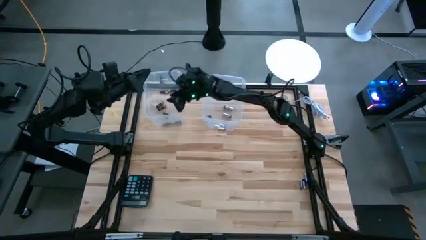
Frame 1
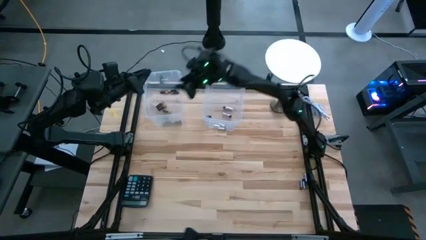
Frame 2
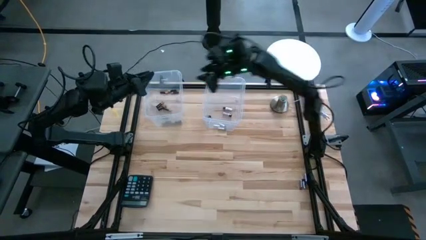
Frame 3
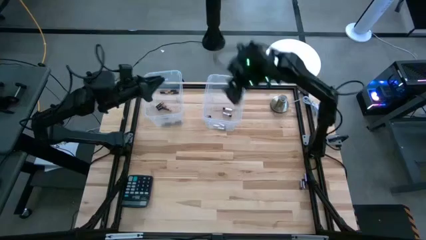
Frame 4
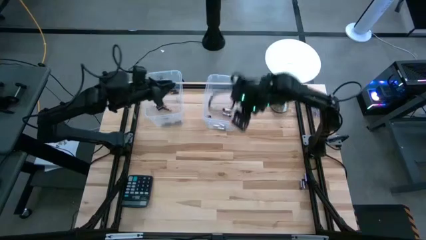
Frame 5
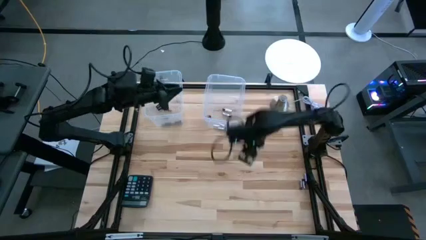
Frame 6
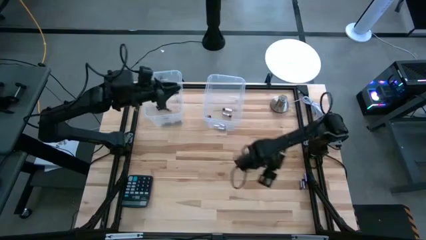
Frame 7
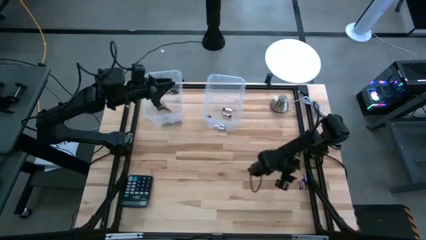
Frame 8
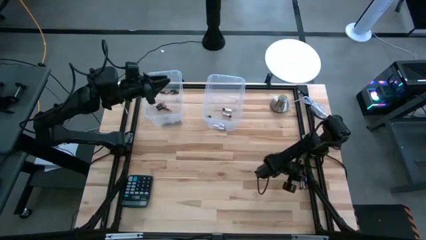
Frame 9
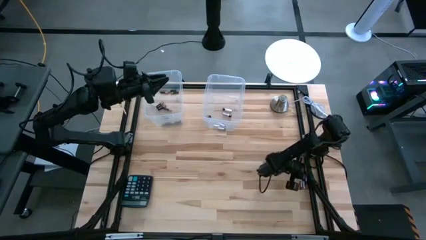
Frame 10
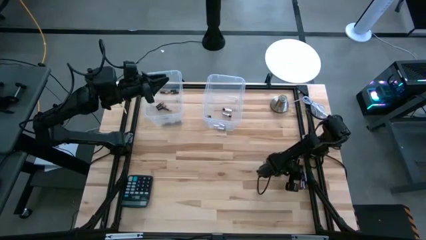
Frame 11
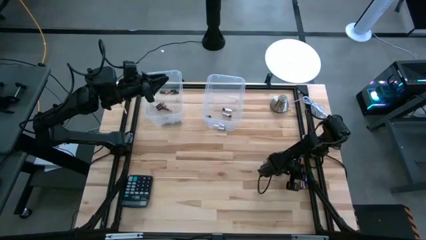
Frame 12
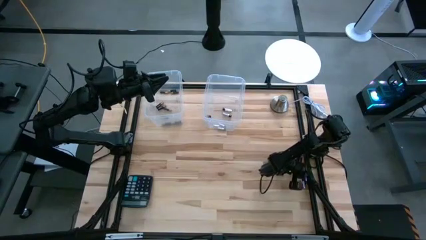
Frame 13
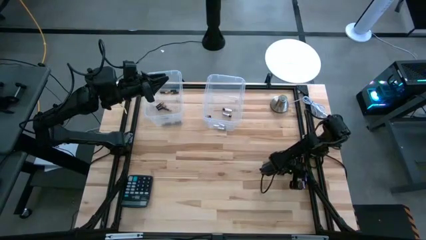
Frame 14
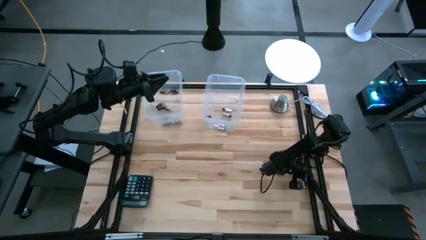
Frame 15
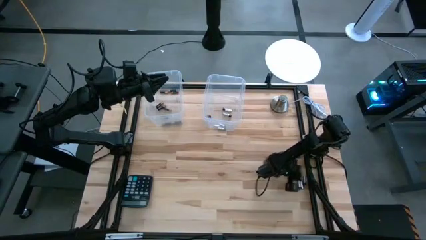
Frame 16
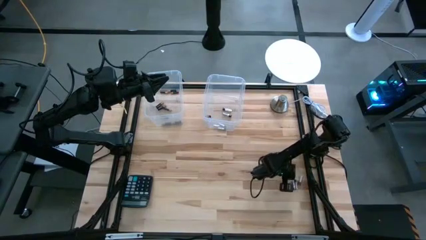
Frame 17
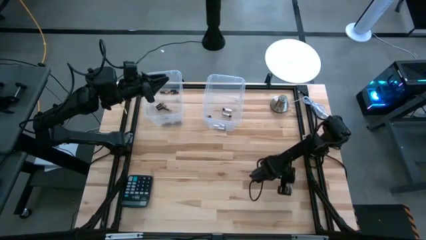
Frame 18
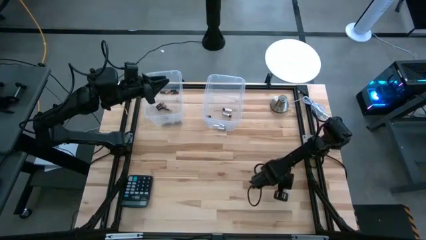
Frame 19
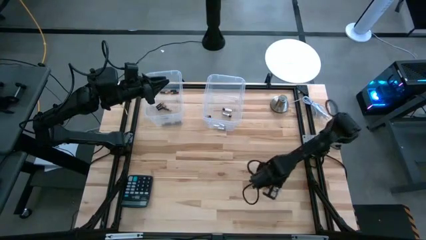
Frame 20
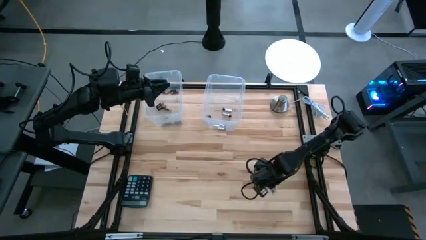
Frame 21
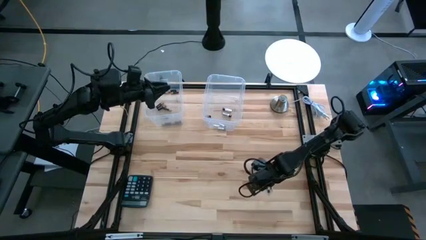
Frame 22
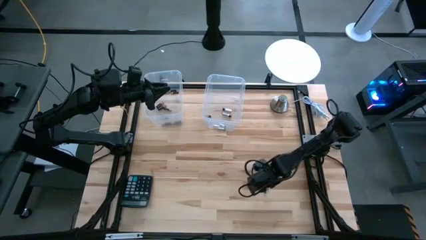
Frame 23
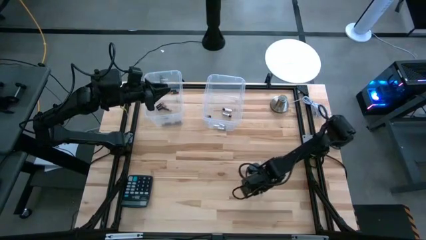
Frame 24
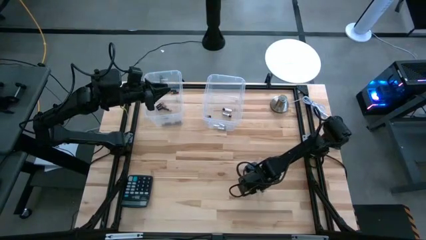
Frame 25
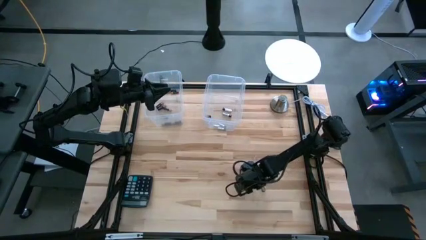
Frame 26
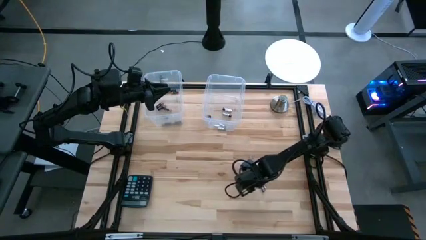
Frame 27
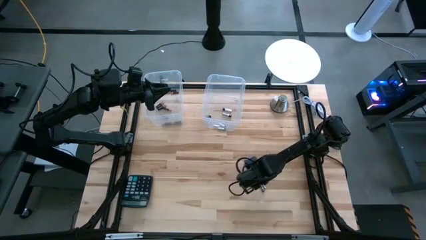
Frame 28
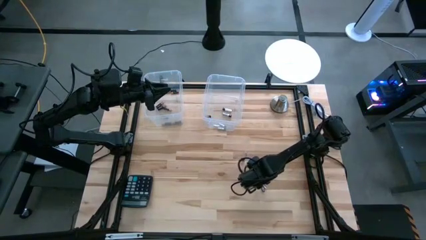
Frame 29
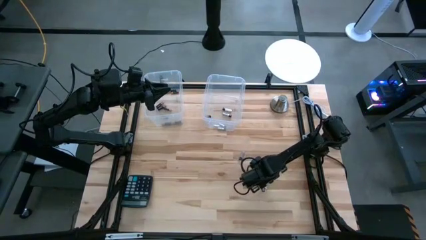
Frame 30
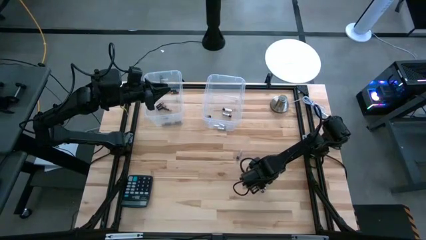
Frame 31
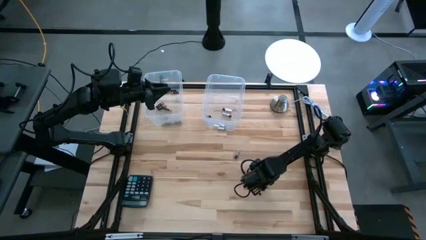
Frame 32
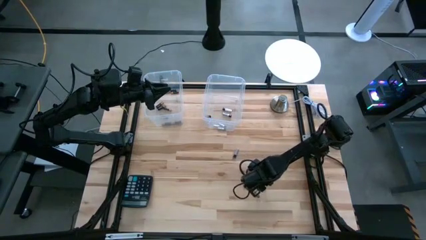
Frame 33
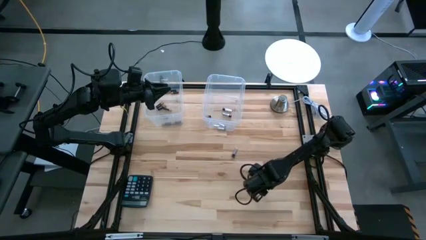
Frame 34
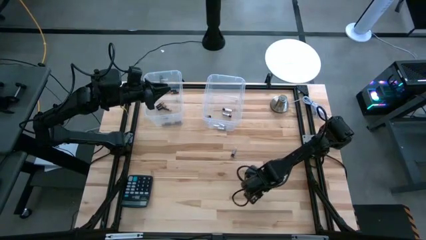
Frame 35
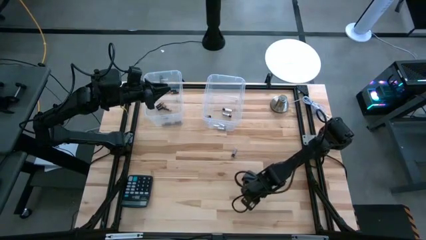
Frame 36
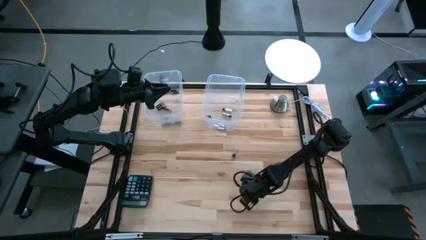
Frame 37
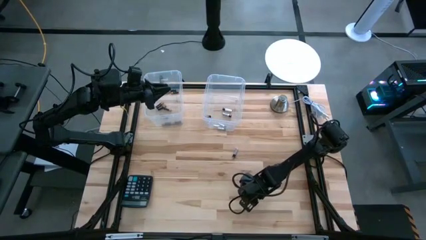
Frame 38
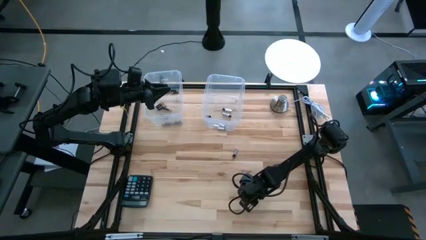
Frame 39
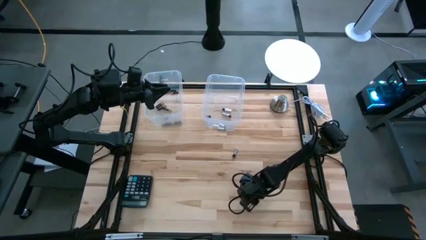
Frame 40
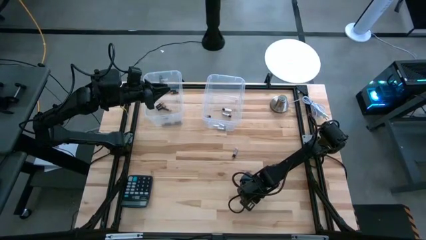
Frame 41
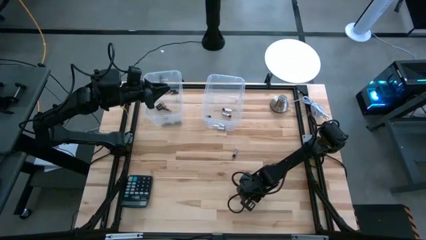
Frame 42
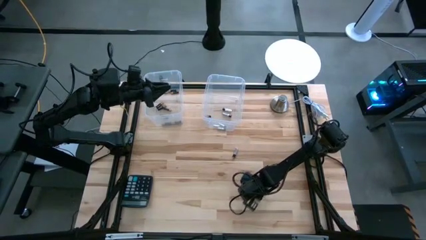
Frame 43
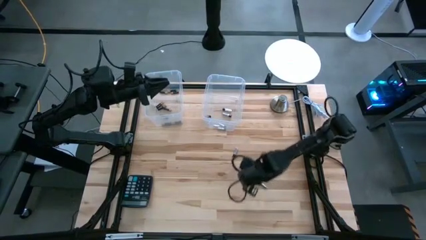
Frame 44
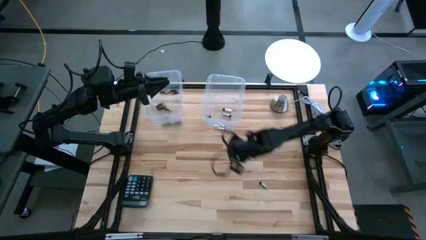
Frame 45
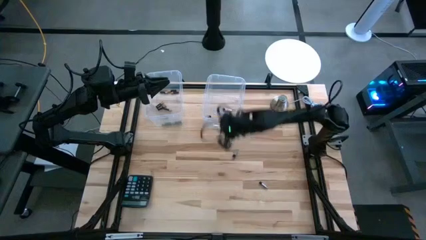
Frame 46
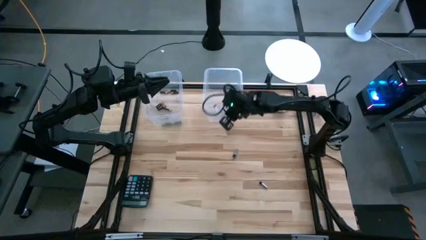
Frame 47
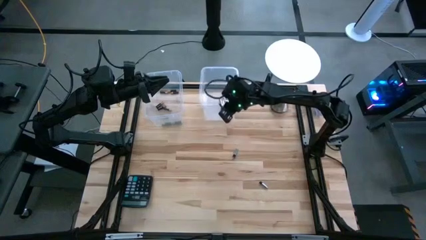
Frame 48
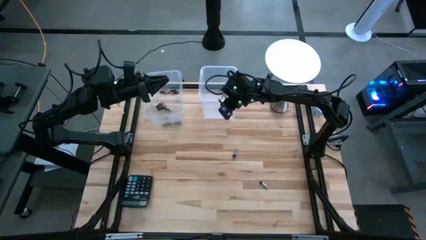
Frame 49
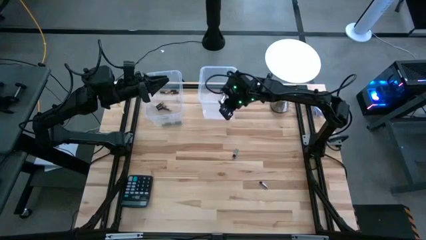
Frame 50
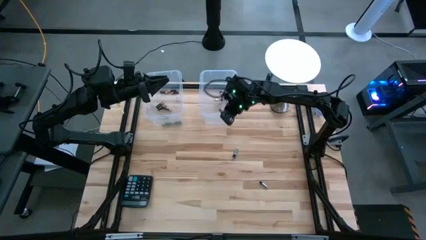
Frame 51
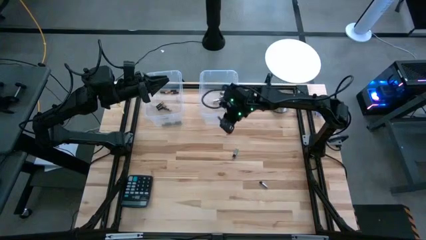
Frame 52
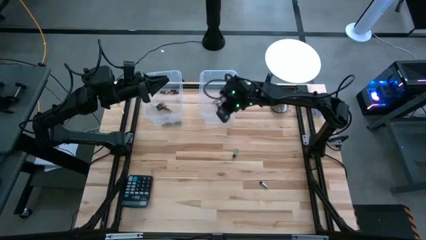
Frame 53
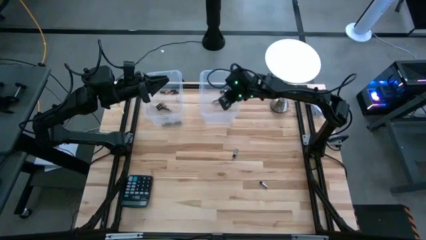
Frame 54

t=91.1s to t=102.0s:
Task: Sort batteries
Put silver battery into the right transparent bin

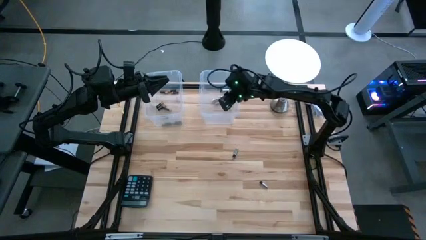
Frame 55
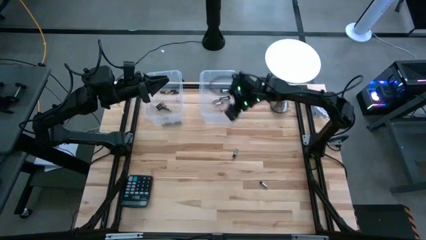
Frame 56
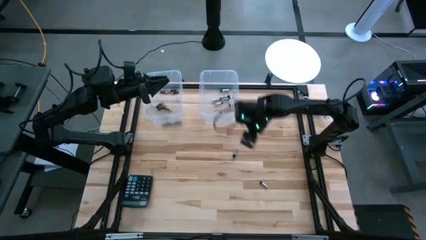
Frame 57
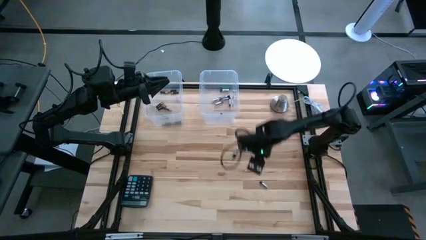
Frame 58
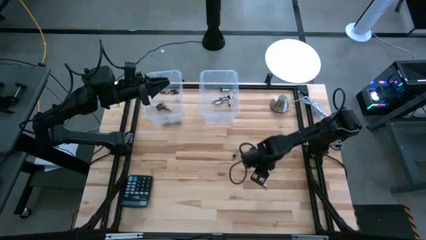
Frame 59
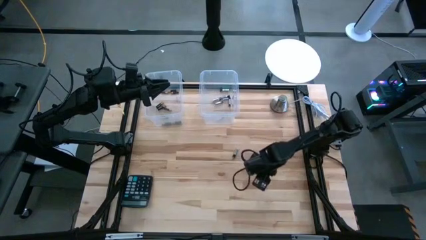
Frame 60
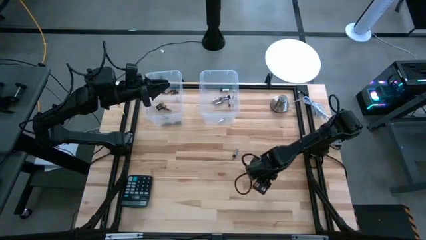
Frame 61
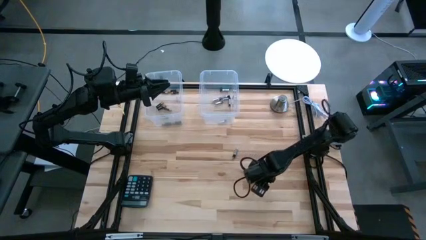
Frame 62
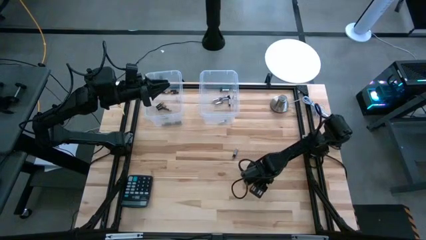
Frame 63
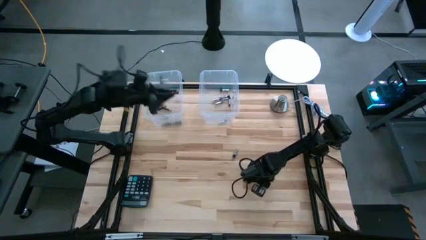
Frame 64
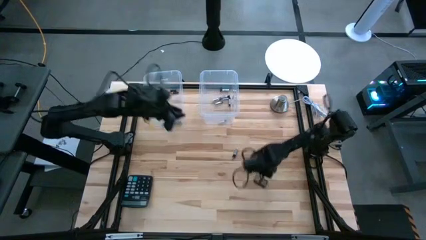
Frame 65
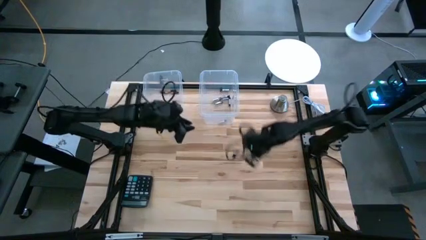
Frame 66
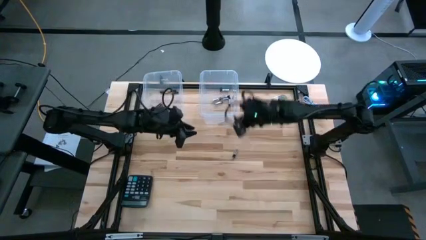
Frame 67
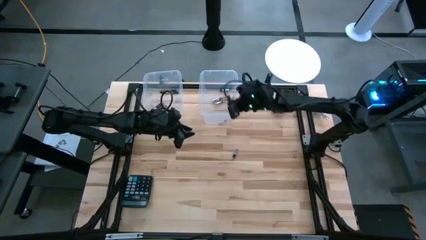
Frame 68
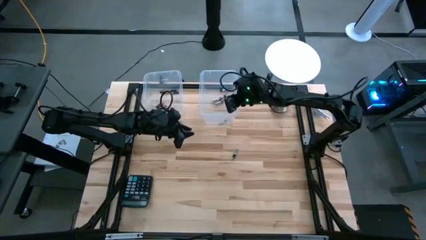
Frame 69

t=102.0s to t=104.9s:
Put silver battery into the right transparent bin

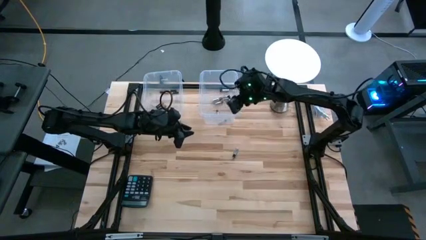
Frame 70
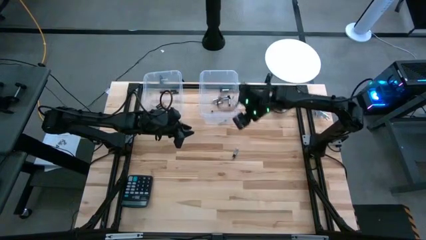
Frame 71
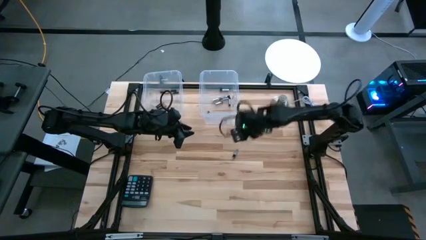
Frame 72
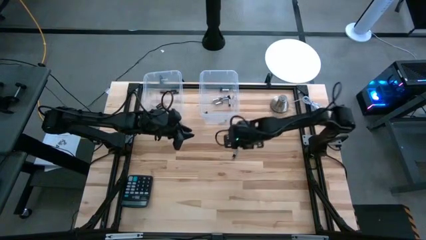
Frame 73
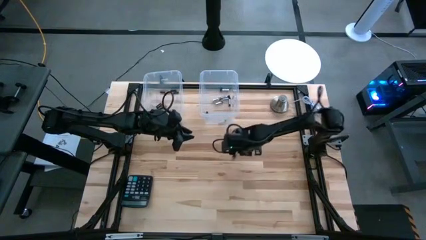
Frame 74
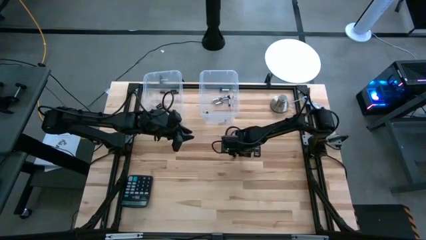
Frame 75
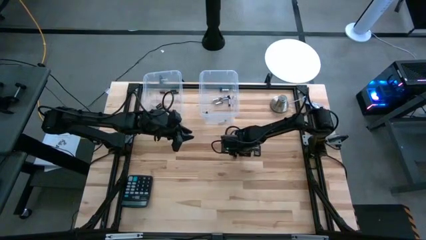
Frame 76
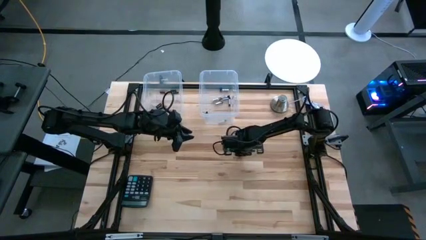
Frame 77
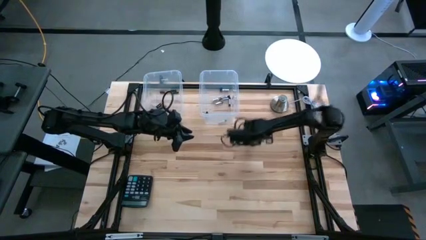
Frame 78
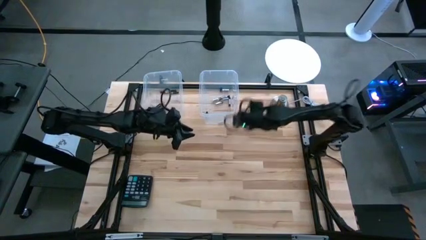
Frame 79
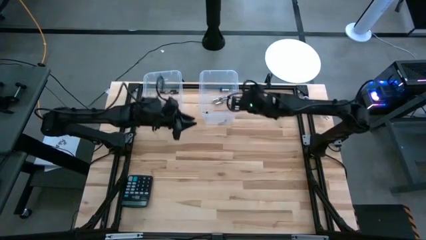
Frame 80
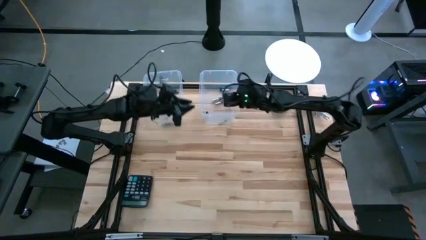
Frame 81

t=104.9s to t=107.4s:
Put silver battery into the right transparent bin

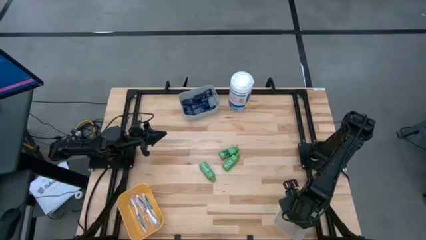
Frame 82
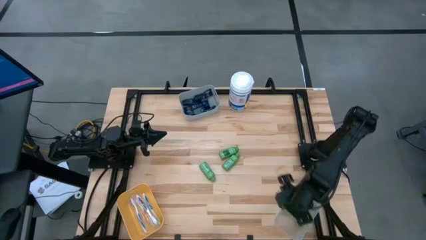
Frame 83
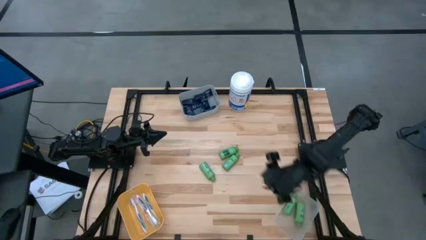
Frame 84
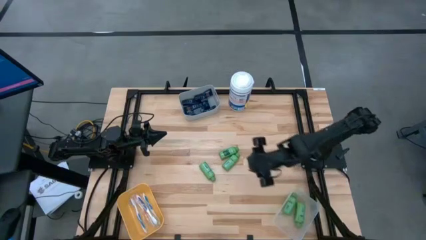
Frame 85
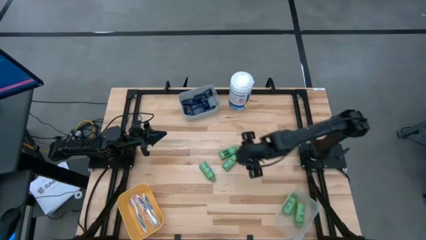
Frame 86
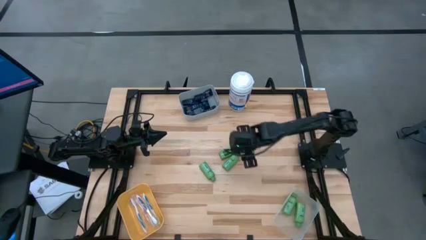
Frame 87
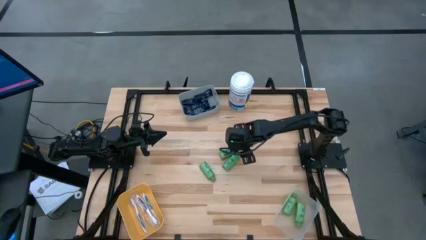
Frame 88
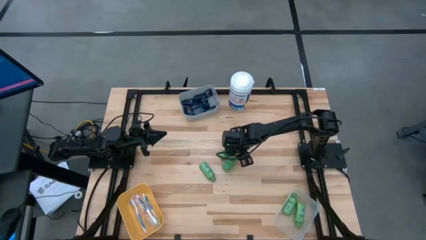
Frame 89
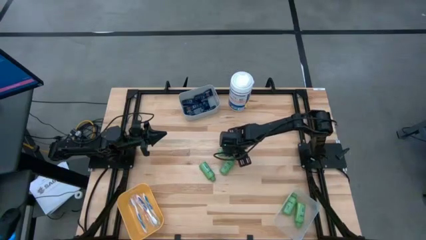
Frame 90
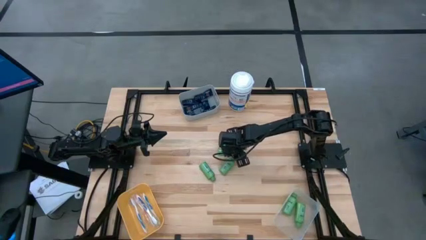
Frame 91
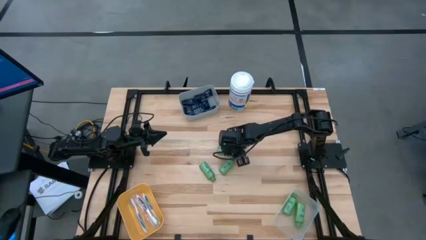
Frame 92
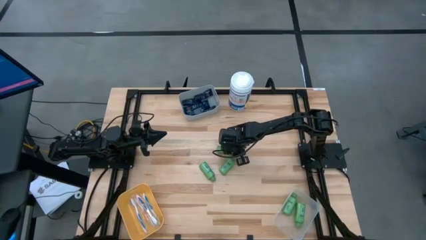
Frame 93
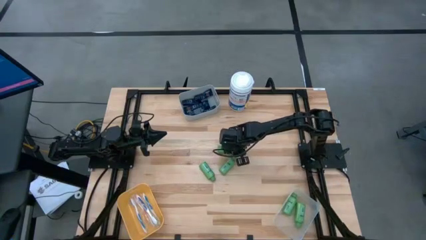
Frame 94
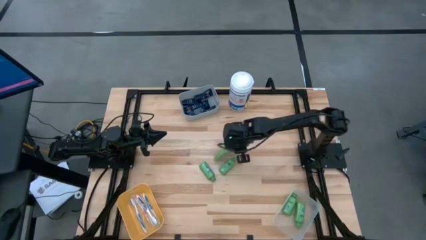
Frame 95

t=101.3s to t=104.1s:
Task: Pick & Place Travel size toiletries
Put the green shampoo into the transparent bin
